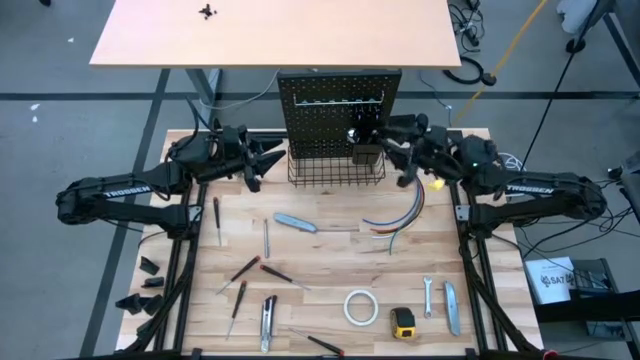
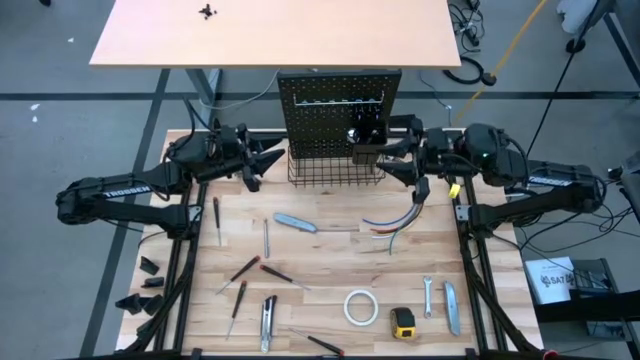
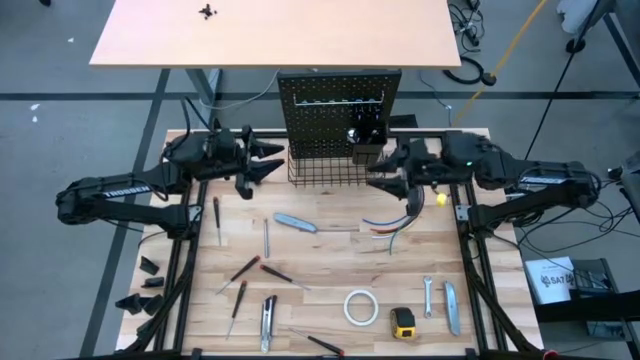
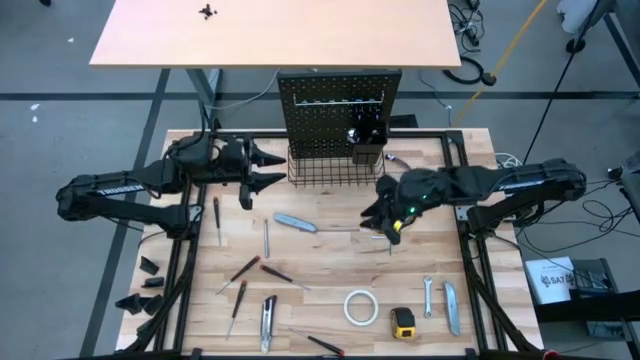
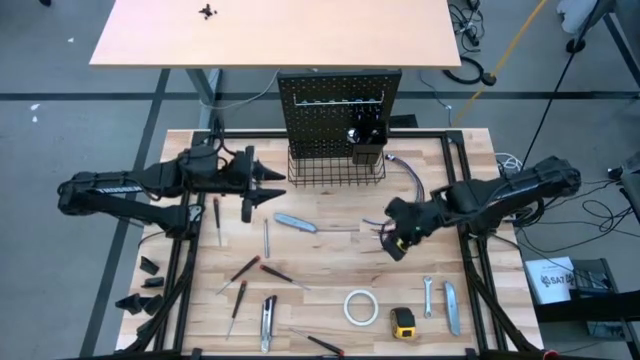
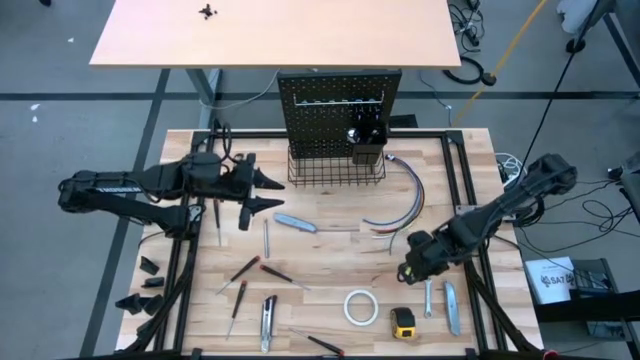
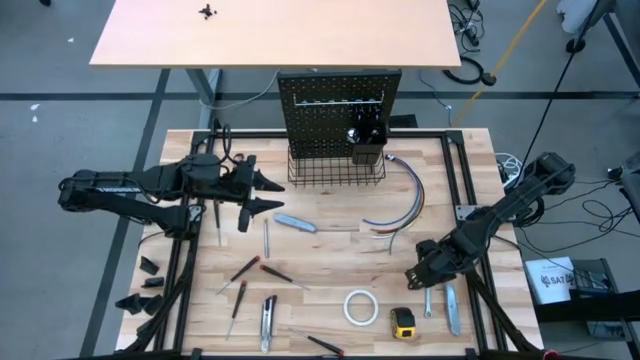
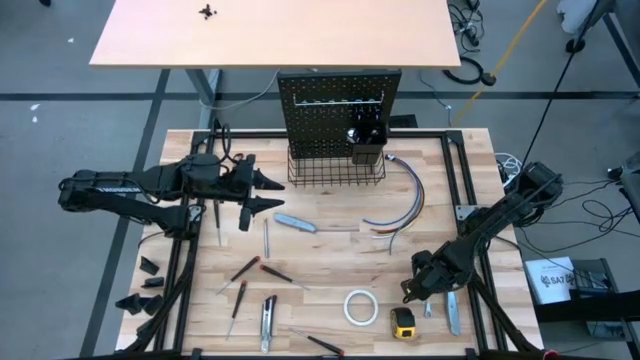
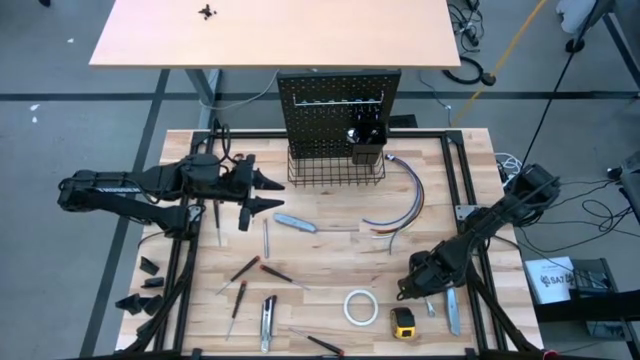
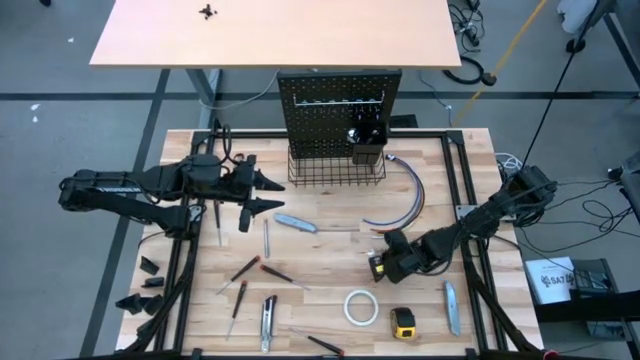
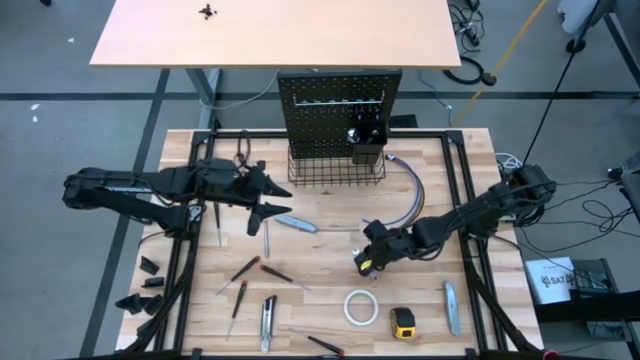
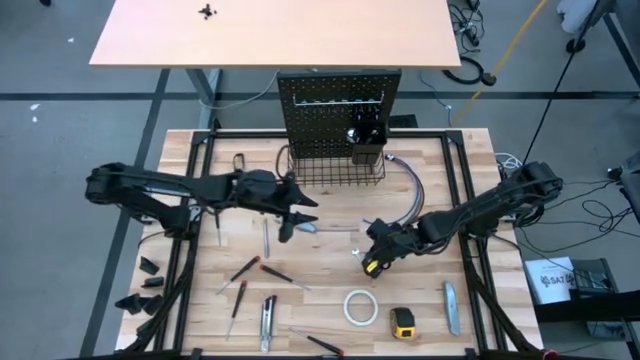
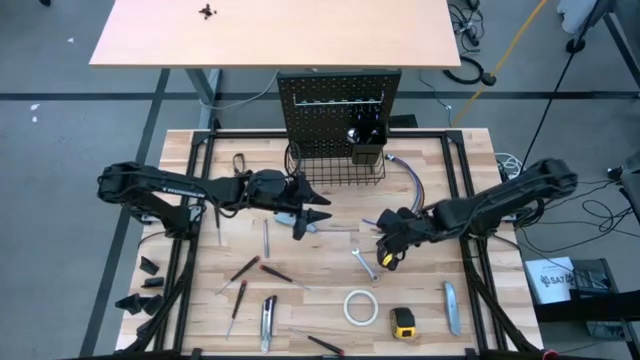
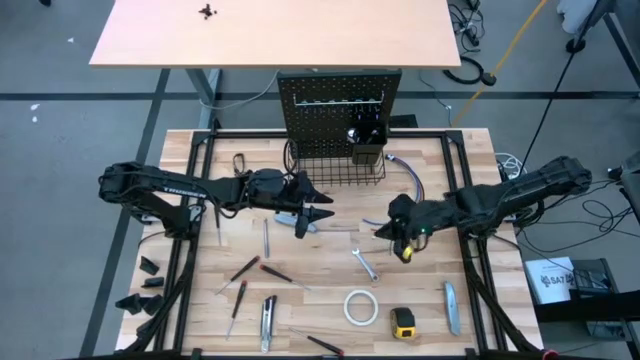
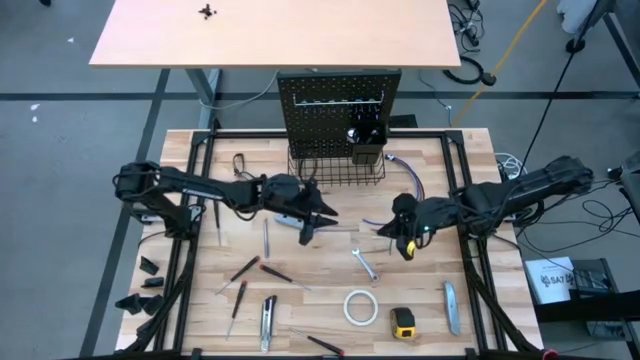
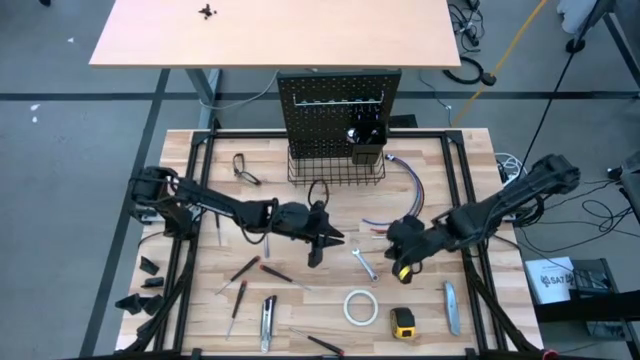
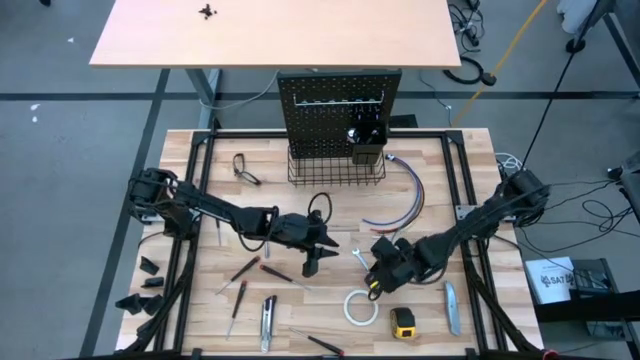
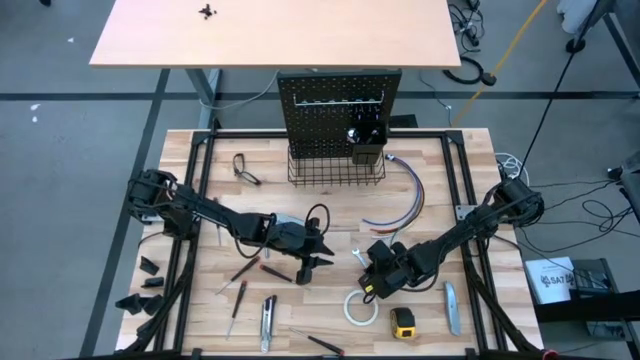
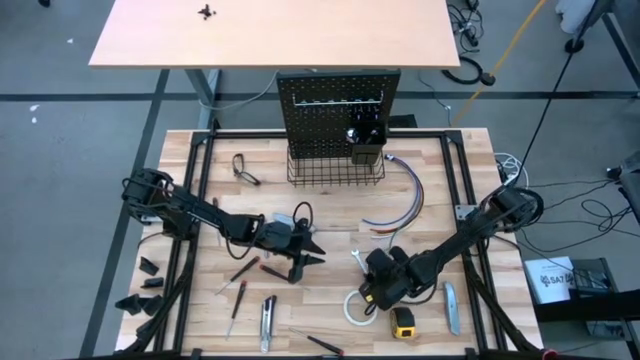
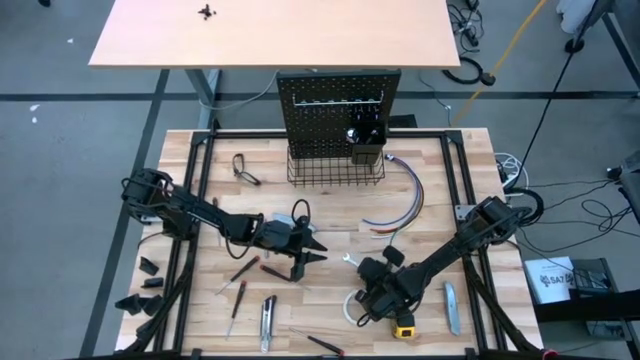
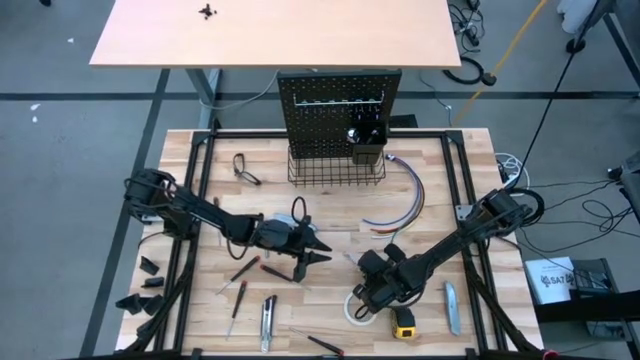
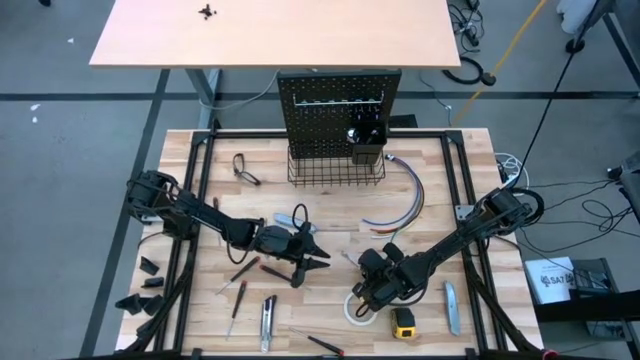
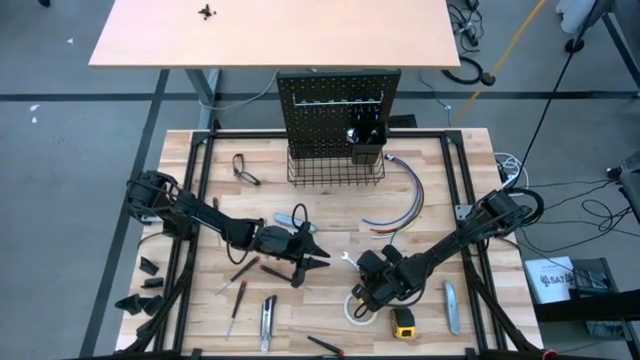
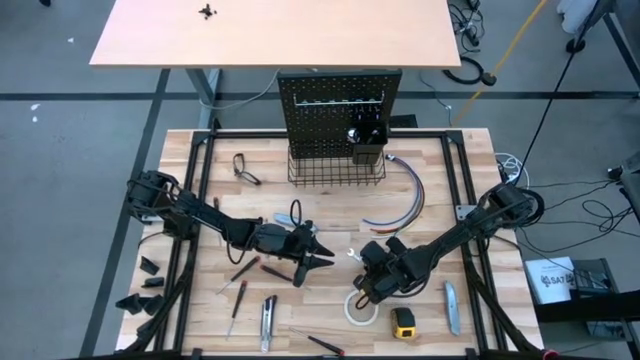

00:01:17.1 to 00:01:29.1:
Task: Hang tools onto peg board
Put the wrench into the black bin on the pegboard
